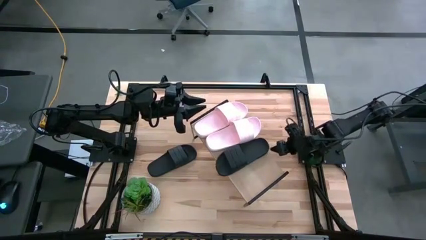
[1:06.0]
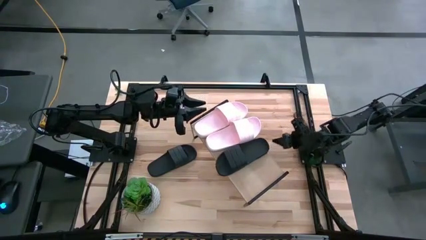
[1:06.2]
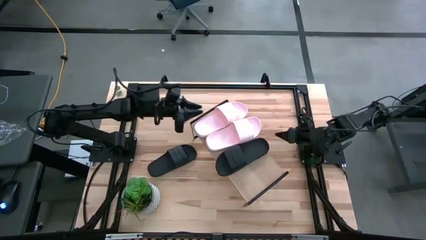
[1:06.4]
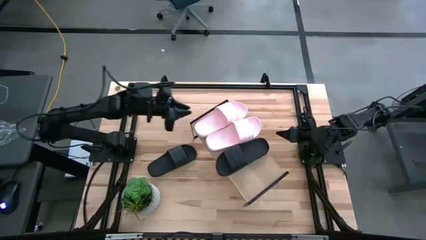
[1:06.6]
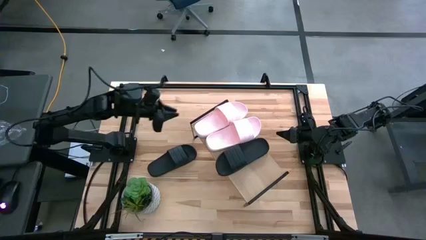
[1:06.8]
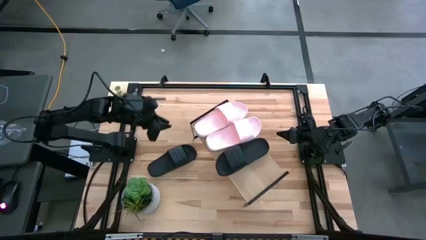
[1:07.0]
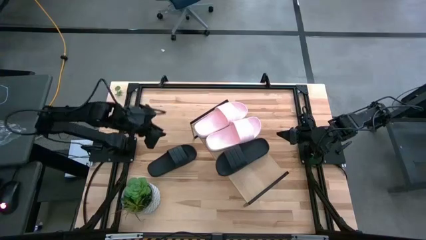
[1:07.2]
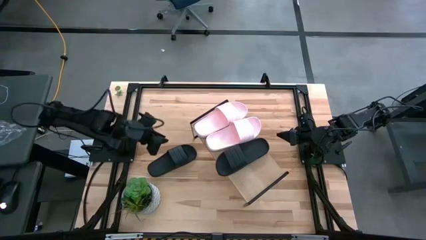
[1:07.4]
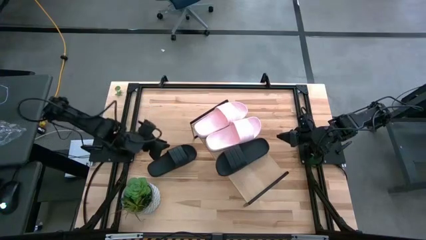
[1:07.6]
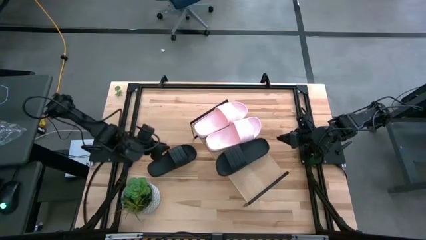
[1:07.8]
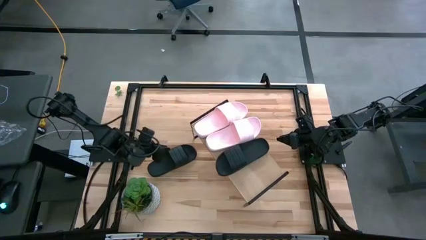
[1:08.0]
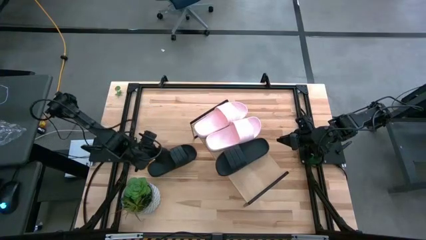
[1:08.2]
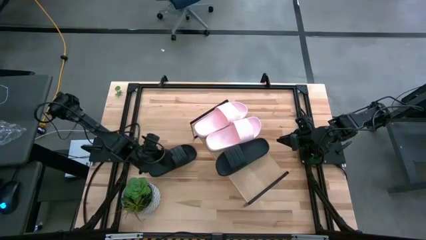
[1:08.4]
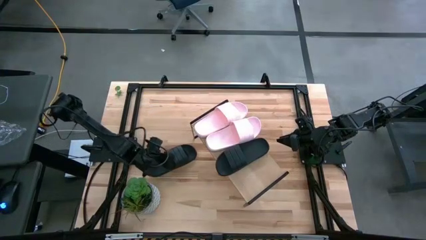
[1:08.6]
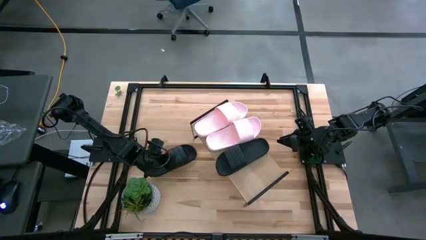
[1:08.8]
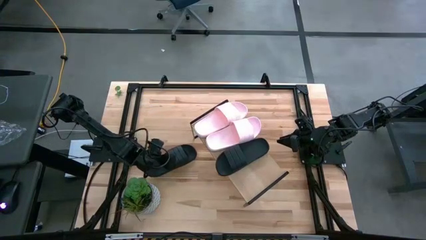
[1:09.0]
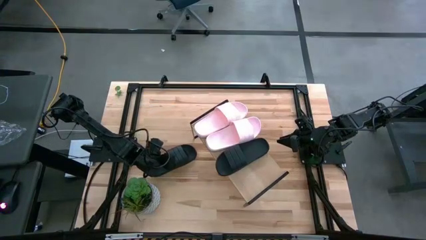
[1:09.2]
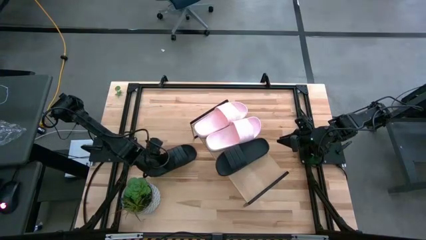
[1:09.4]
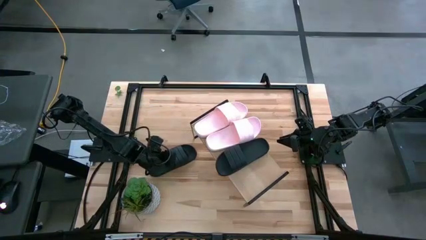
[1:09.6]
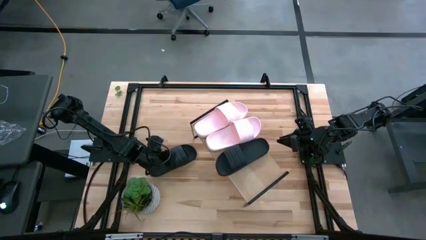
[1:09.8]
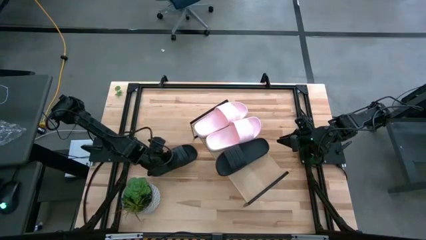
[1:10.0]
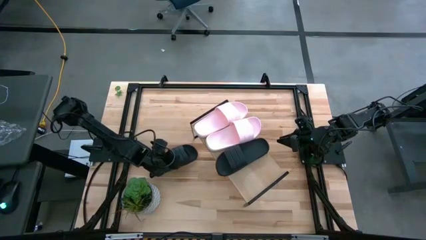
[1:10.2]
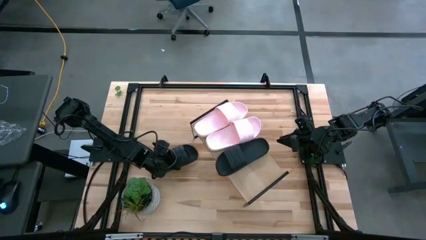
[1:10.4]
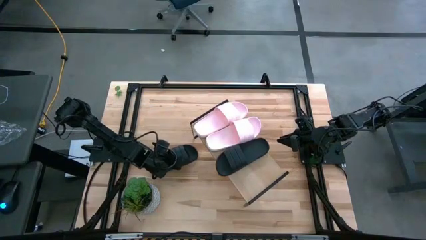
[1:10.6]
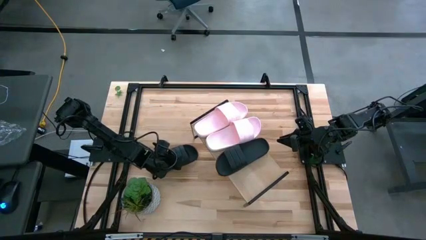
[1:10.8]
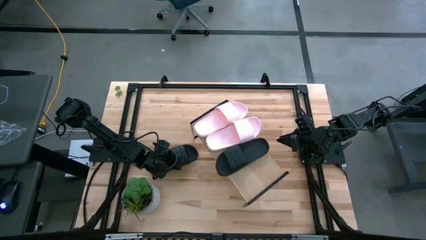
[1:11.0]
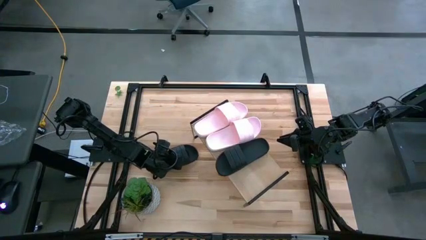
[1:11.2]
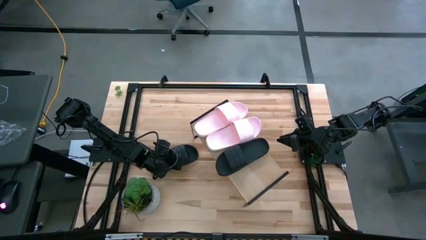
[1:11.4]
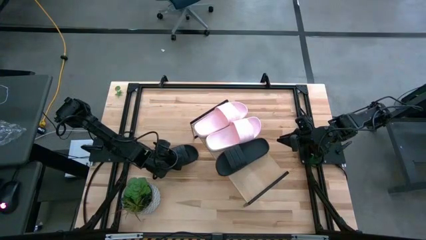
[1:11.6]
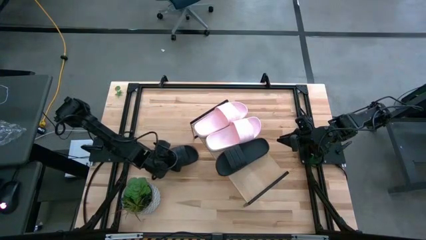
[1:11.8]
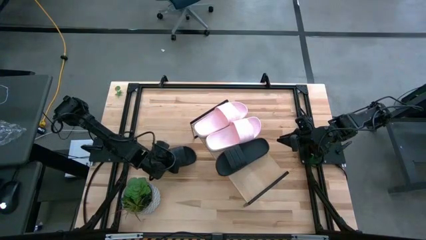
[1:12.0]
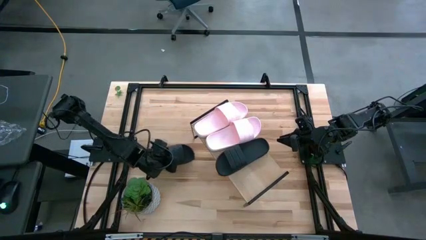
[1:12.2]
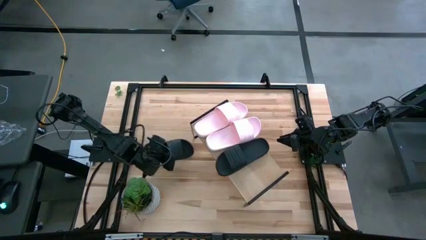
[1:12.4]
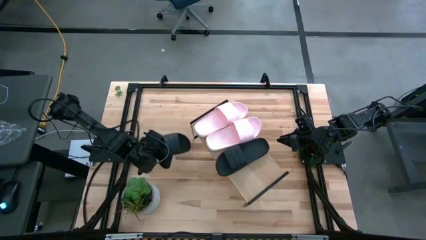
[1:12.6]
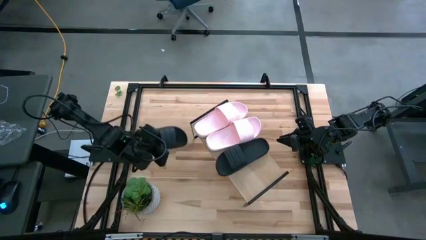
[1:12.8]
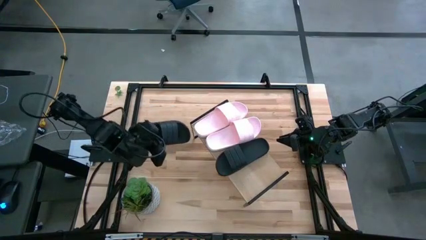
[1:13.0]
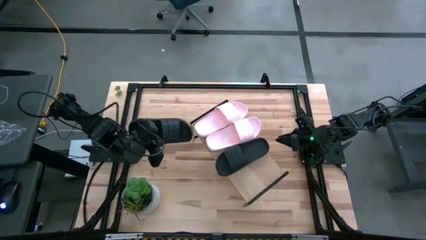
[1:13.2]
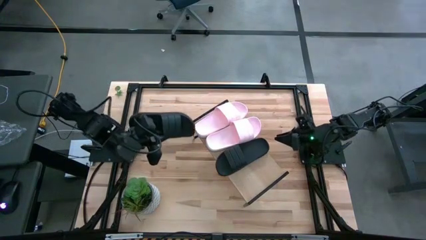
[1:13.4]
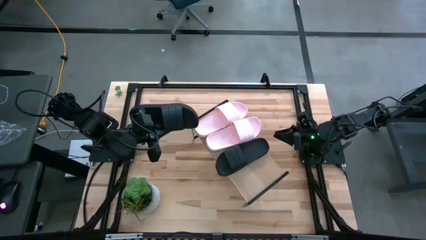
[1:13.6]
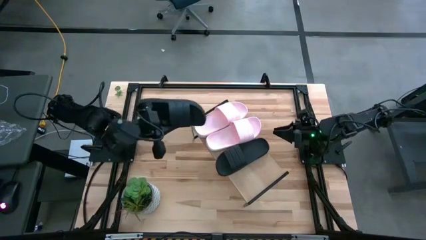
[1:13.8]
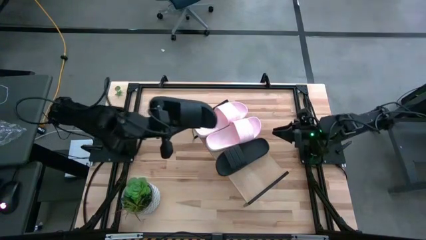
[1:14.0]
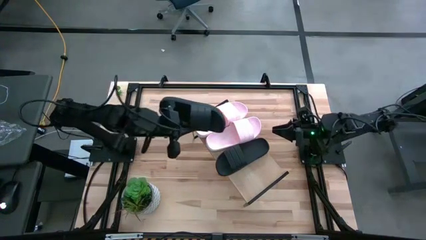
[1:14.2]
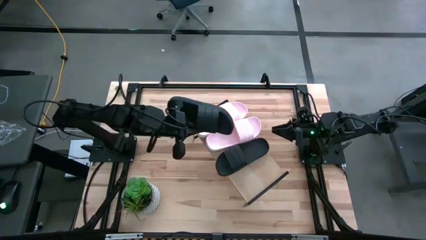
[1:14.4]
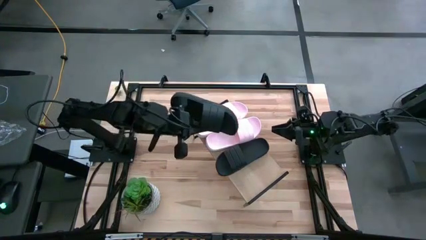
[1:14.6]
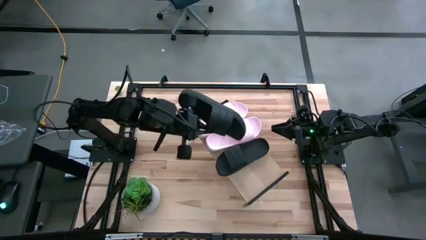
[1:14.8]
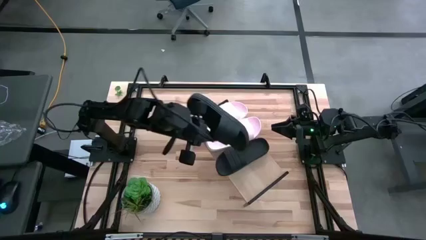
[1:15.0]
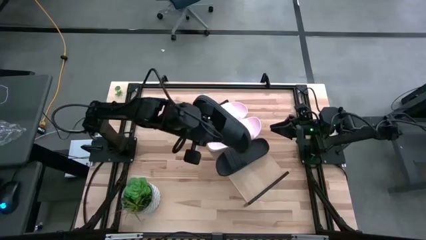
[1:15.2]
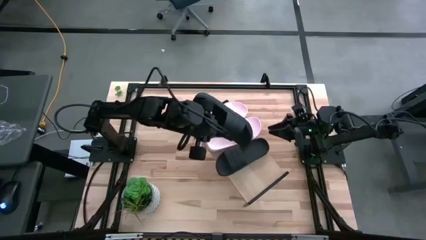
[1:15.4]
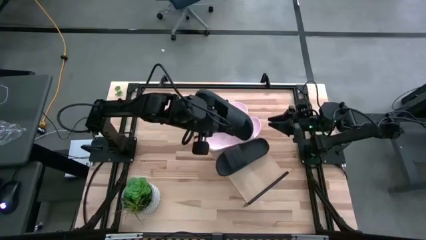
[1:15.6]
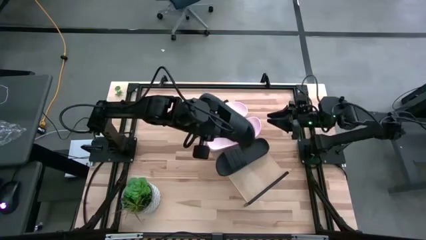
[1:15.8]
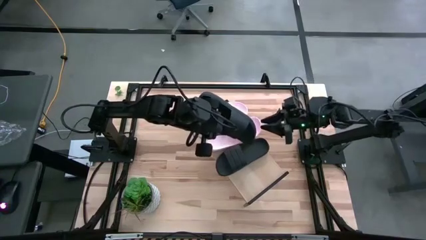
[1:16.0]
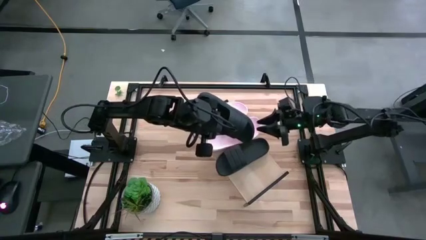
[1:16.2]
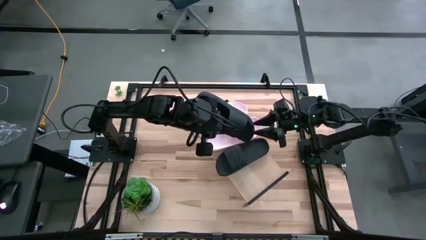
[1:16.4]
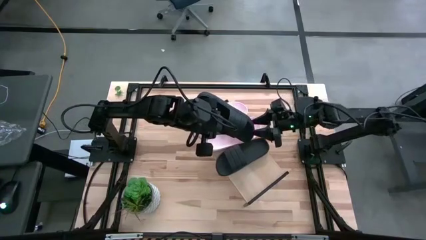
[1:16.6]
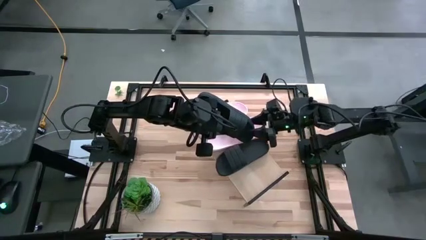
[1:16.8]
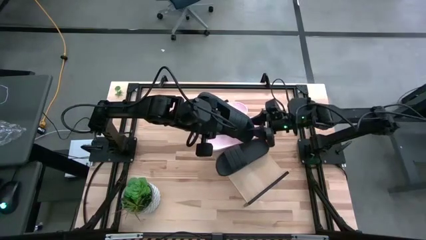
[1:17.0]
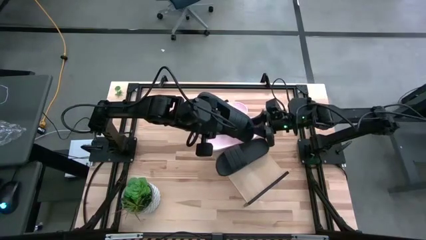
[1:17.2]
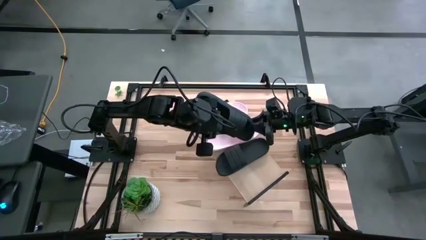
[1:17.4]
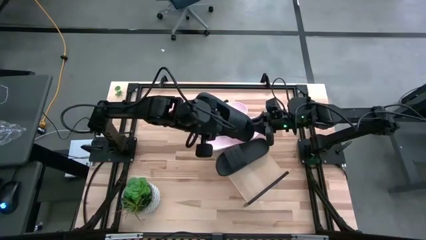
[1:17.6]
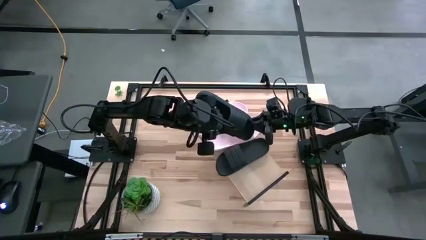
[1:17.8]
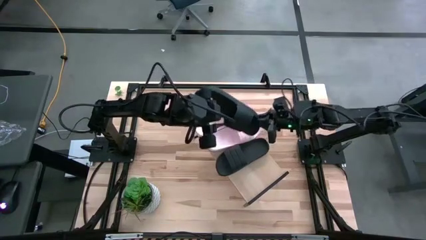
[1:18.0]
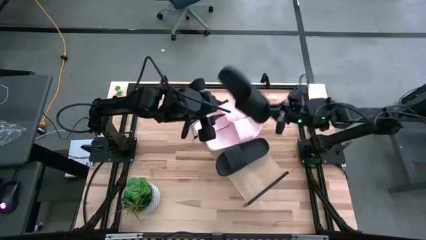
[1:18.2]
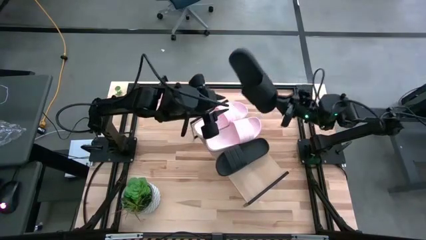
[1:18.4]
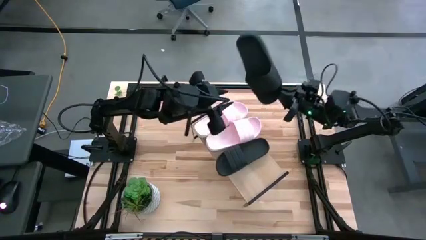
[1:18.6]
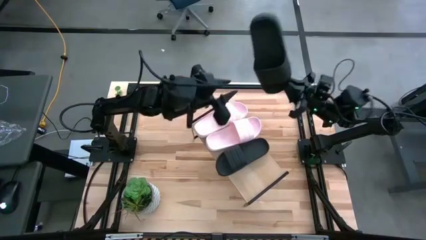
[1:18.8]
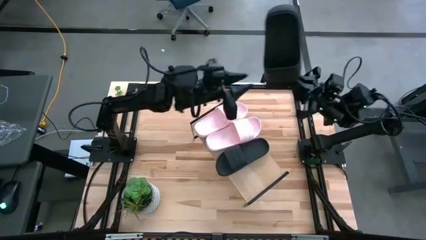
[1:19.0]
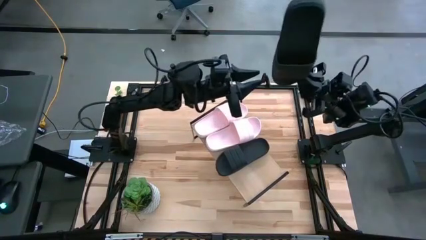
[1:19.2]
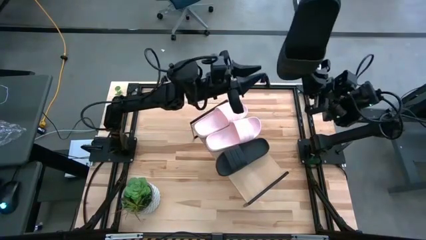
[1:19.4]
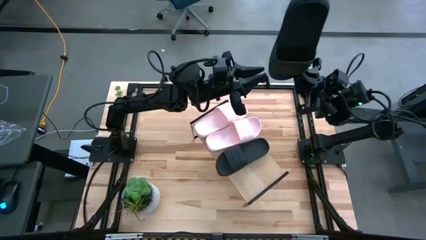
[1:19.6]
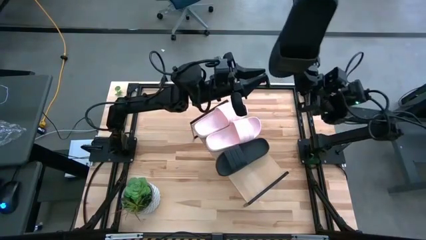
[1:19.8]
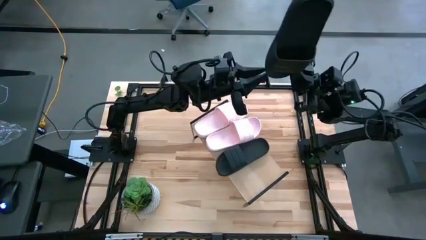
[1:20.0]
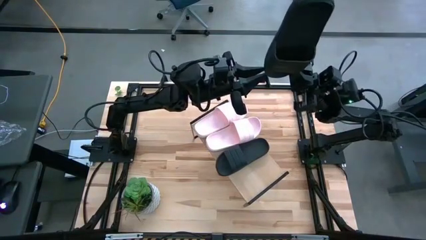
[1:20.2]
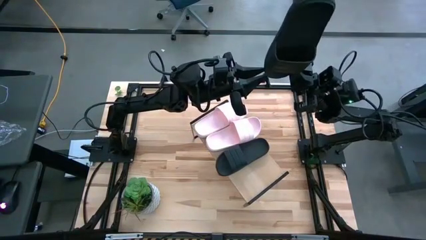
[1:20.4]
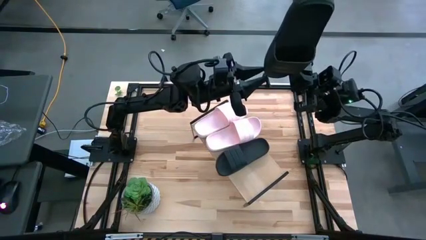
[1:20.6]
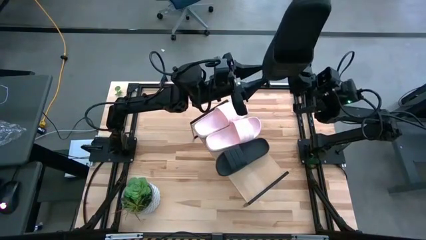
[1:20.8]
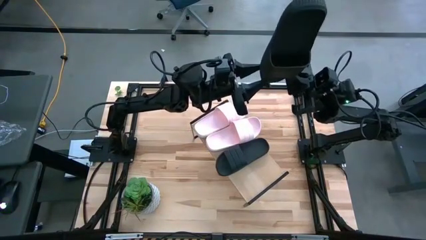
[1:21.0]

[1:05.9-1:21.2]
Task: Pick and place slides into the shelf
Put the black slide on the shelf

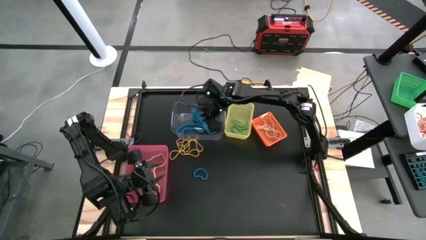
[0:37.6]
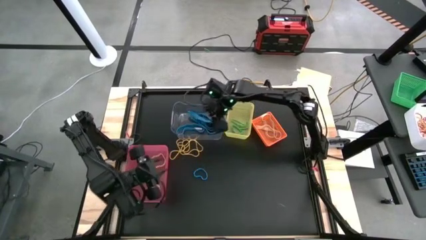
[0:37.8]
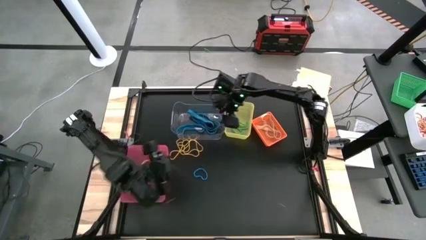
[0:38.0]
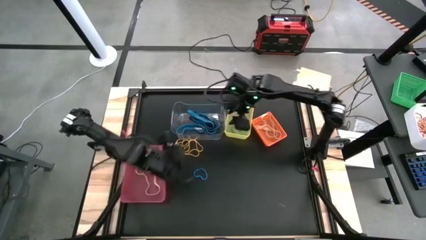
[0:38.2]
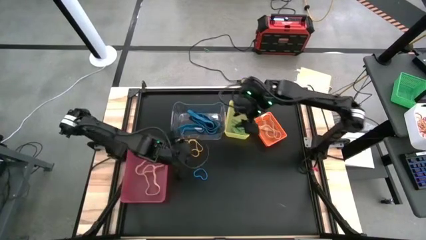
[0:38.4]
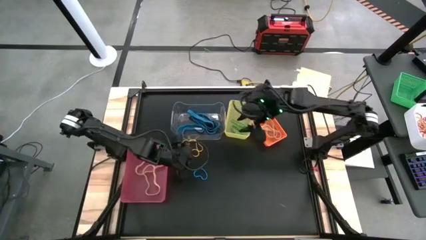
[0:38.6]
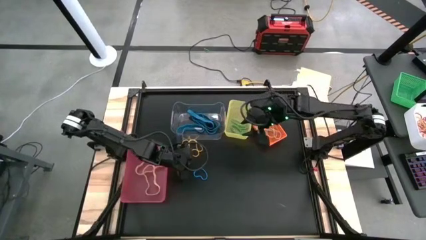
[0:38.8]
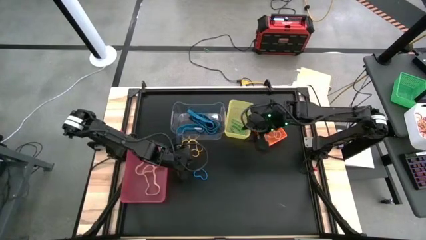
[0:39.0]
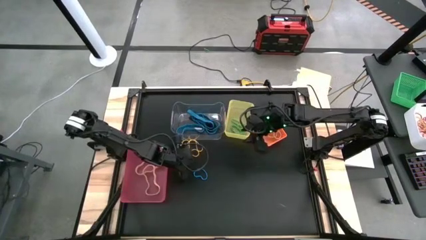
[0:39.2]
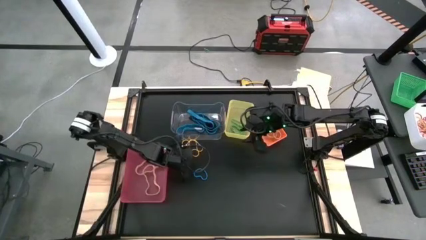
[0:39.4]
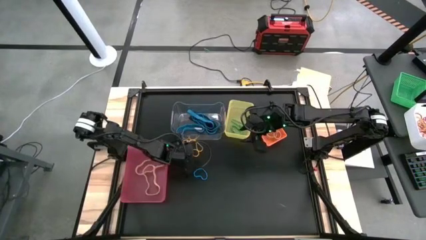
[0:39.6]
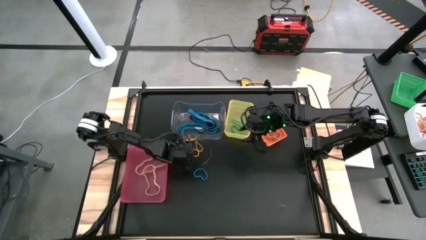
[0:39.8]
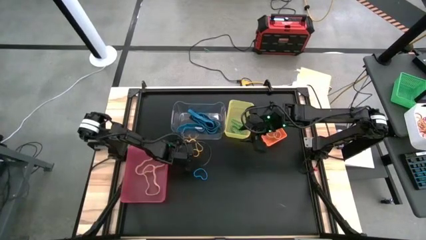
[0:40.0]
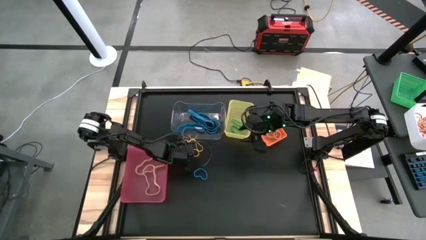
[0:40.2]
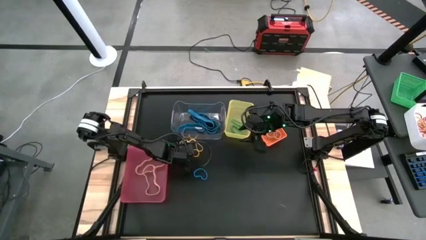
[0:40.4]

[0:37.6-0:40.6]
Task: Sort rubber bands into baskets
Put the yellow rubber band into the orange bin
